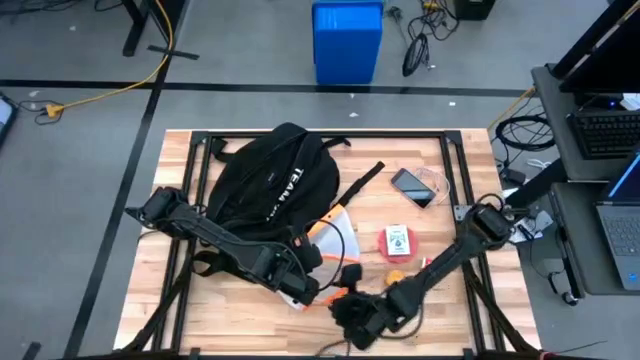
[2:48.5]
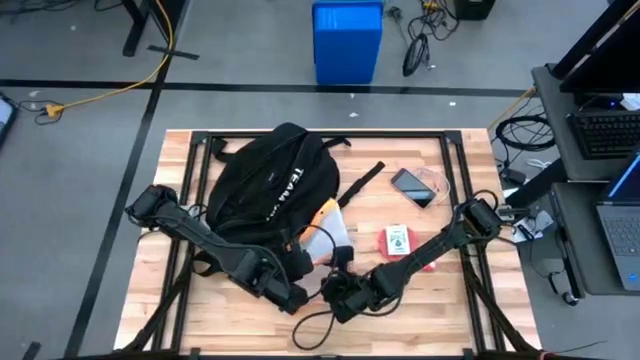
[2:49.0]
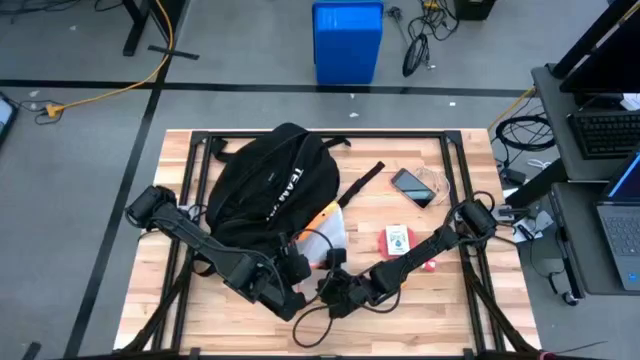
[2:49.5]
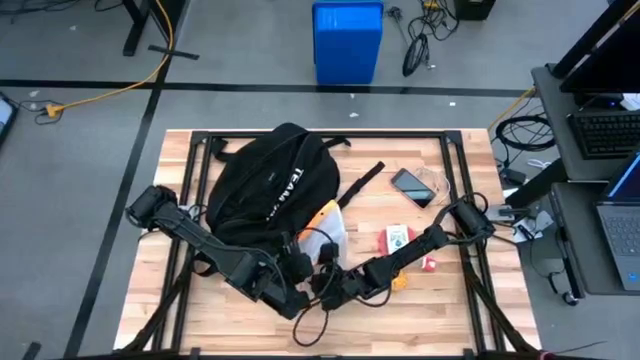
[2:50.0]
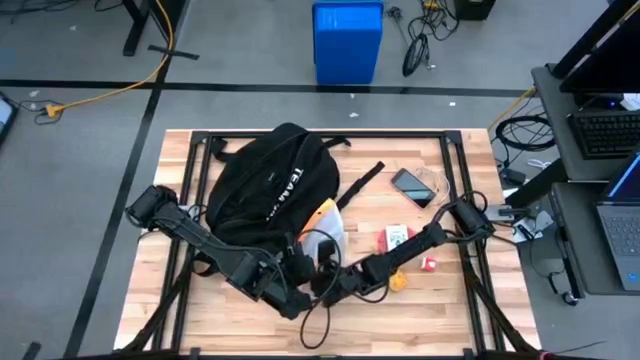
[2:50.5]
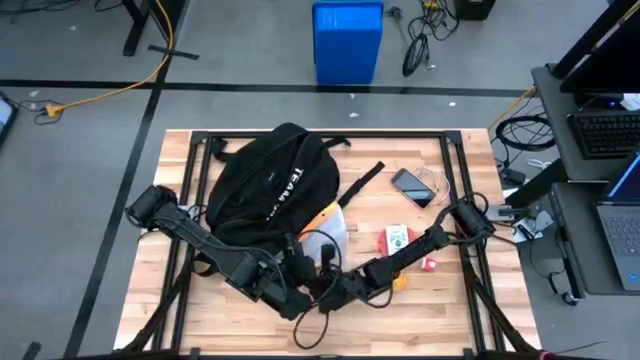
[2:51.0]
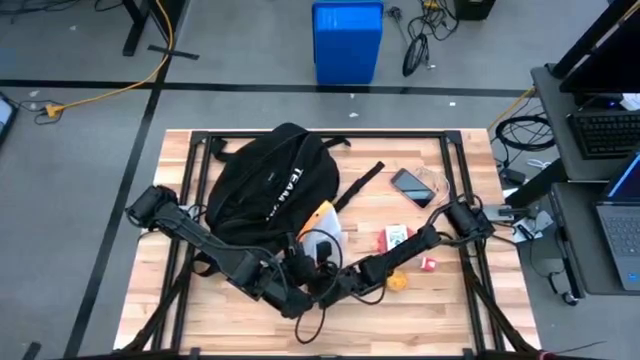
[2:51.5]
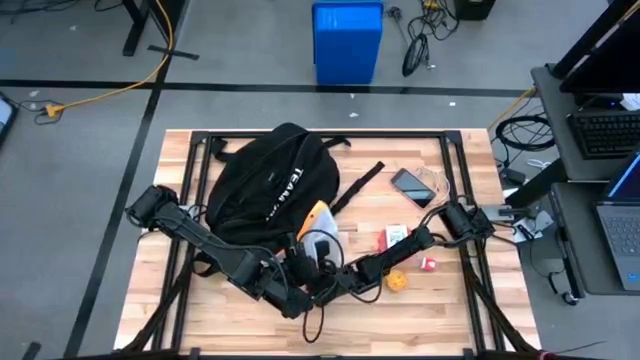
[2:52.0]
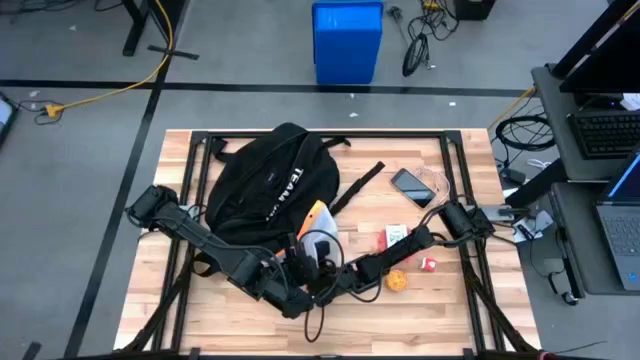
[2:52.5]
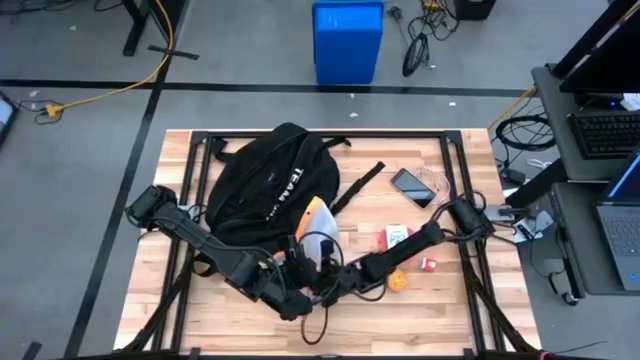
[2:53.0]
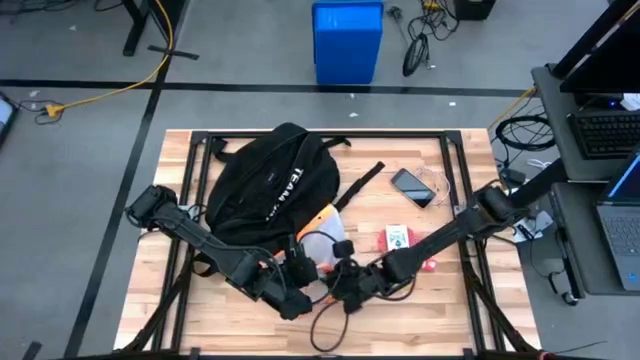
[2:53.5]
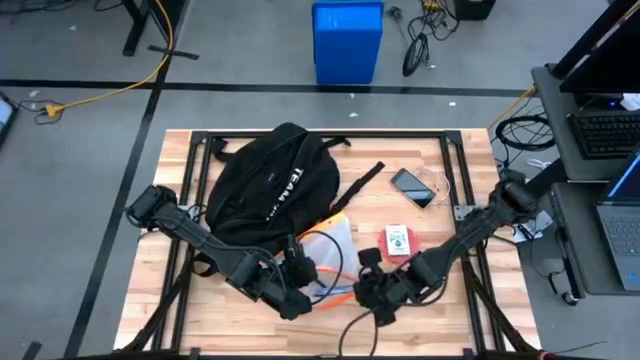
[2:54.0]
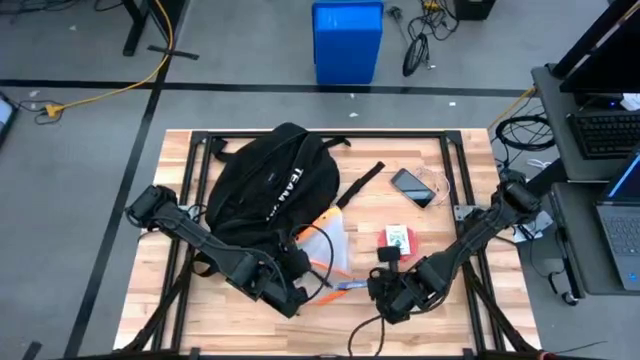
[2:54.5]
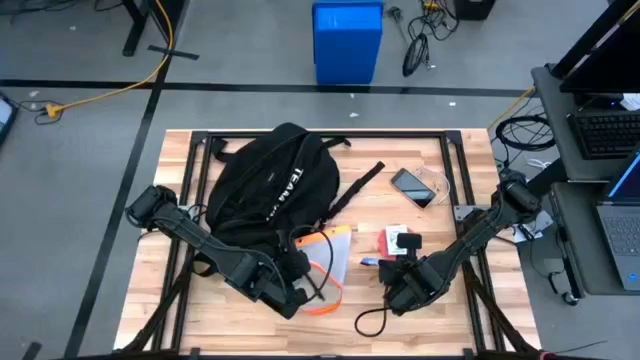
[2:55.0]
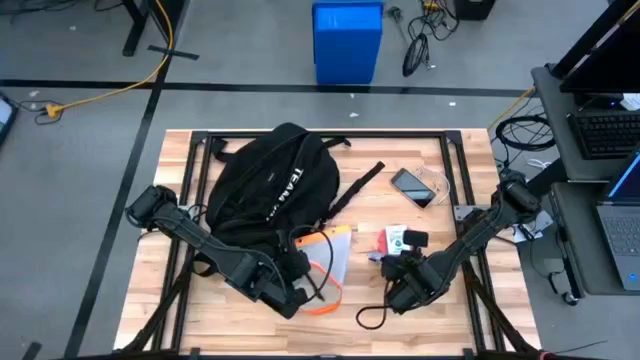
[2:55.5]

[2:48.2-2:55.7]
Task: Unpack backpack
Remove the candy bar from the orange zip bag

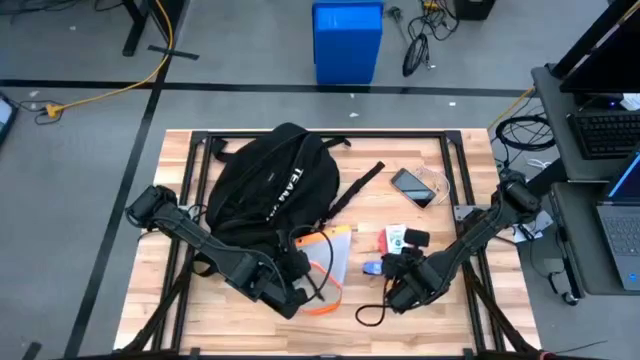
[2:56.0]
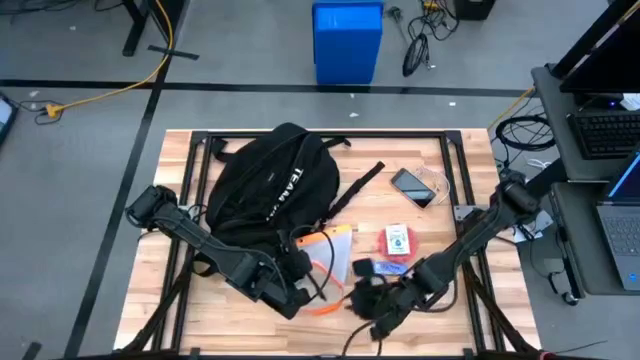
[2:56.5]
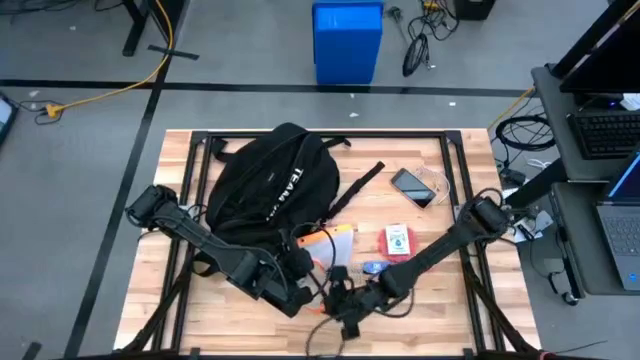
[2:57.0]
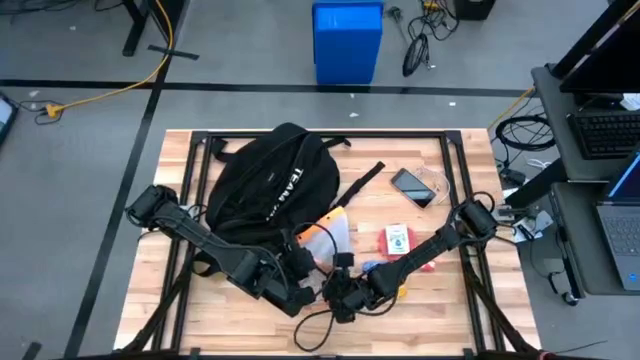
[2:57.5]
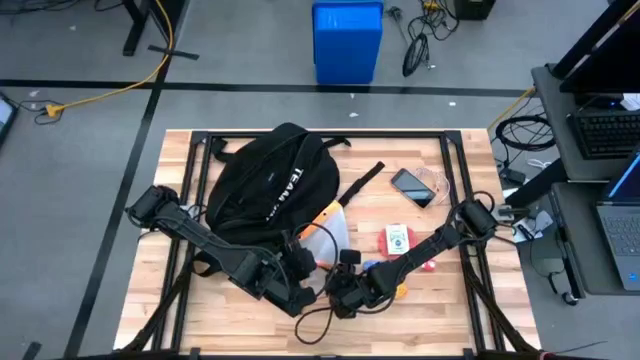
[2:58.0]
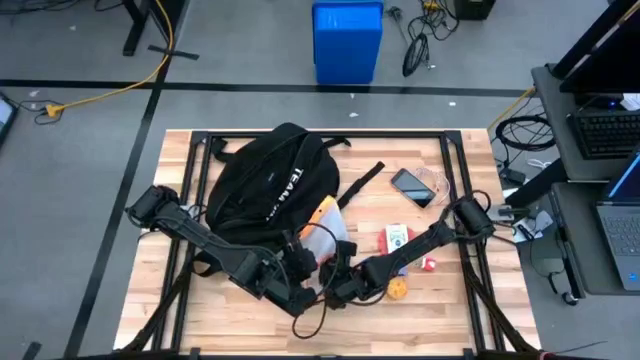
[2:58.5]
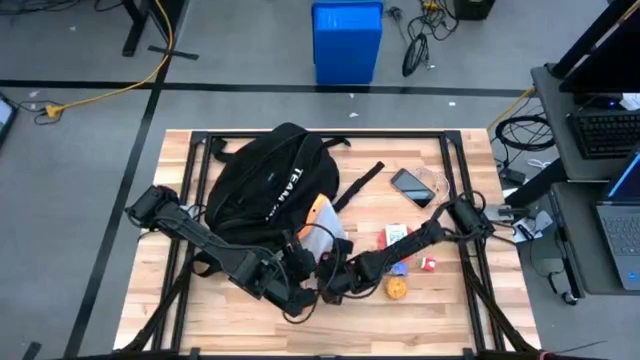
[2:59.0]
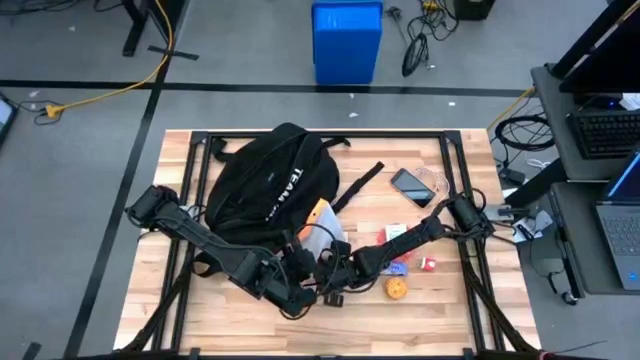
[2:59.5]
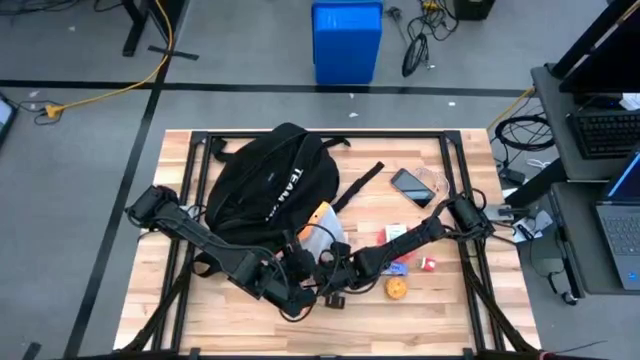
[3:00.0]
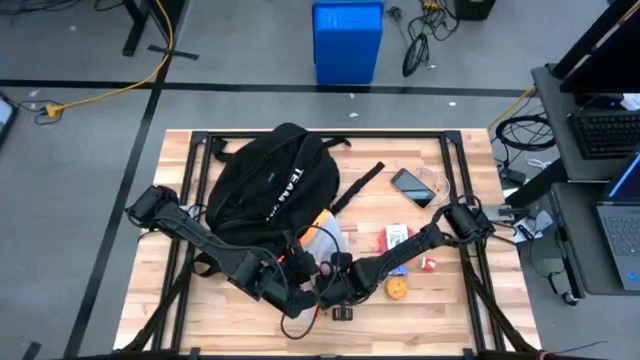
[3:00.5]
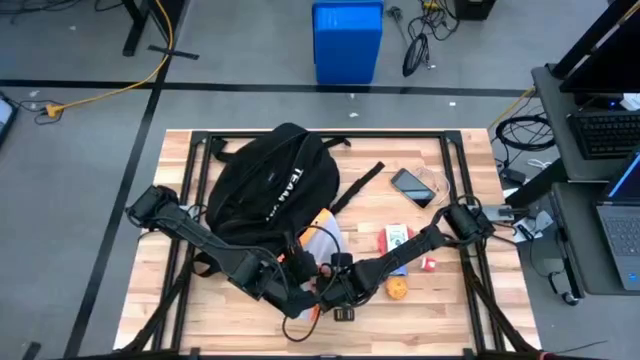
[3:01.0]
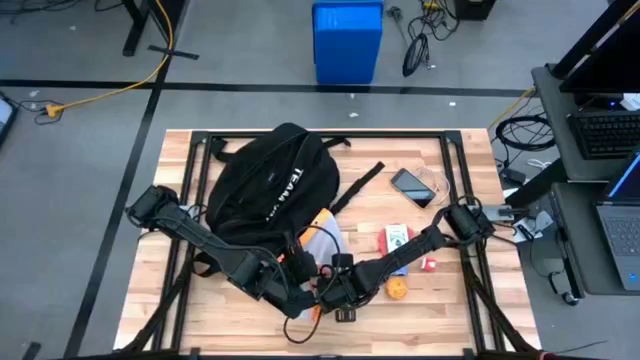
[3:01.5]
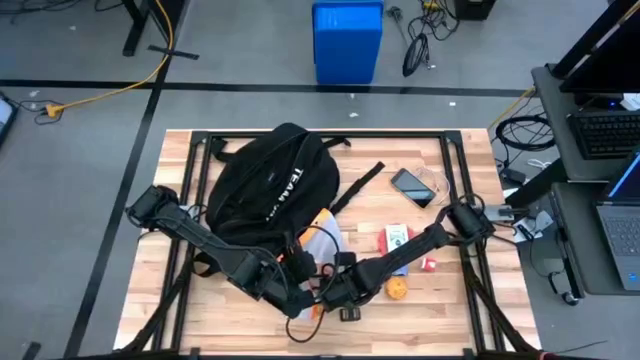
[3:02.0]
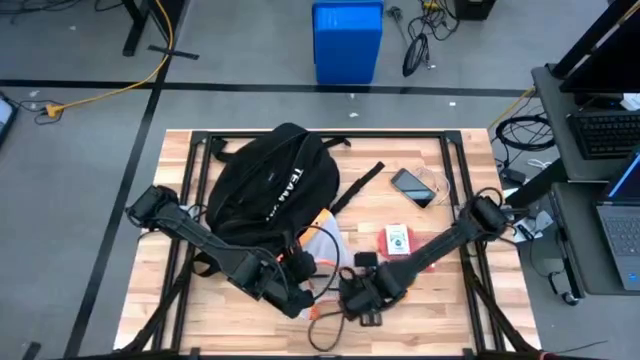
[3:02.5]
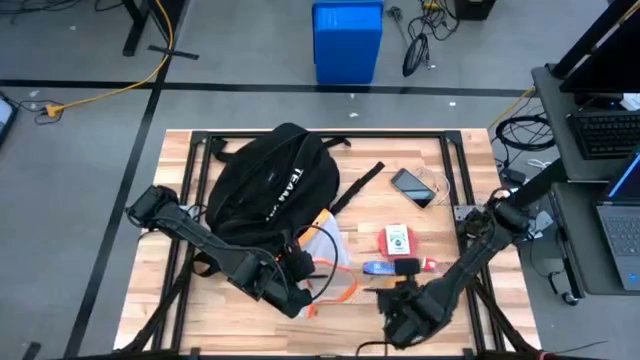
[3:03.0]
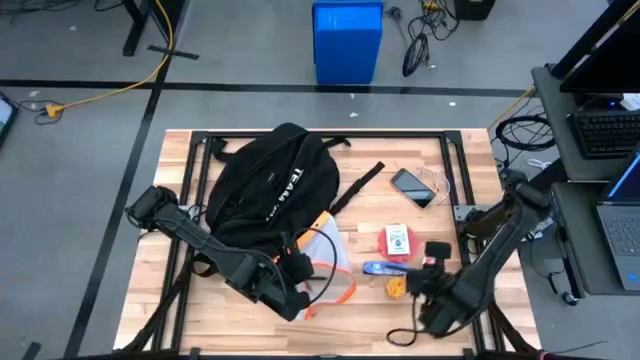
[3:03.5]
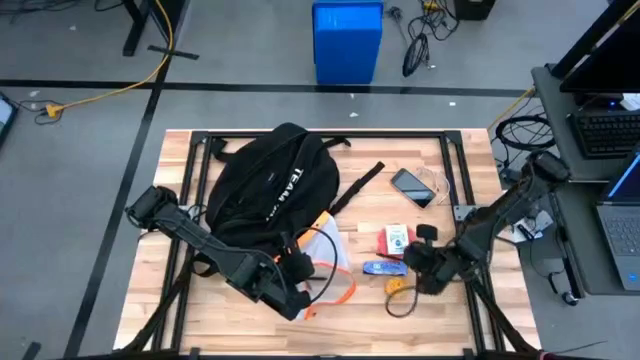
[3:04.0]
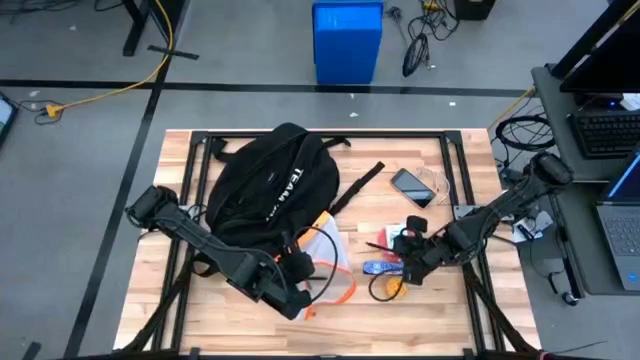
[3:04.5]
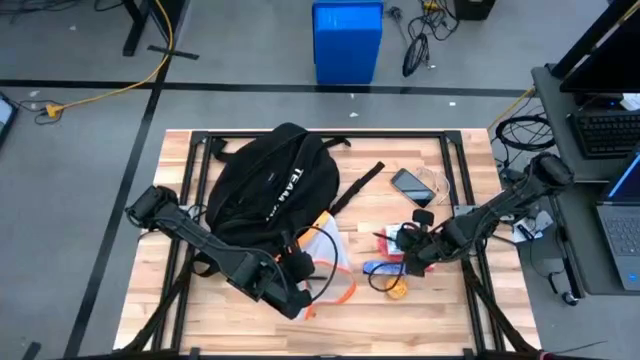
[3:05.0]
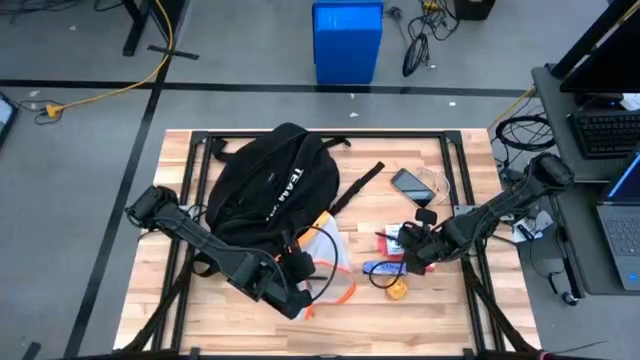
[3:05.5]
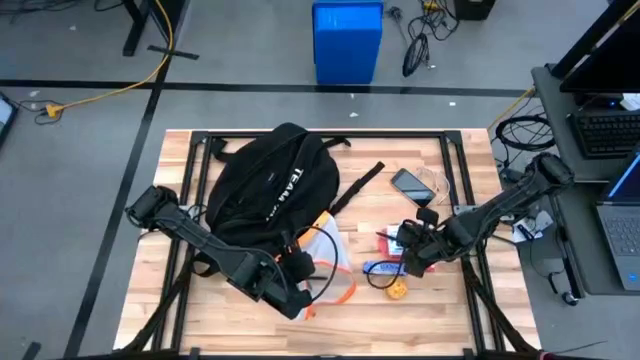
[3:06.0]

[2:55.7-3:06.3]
Remove the black pen from the orange zip bag

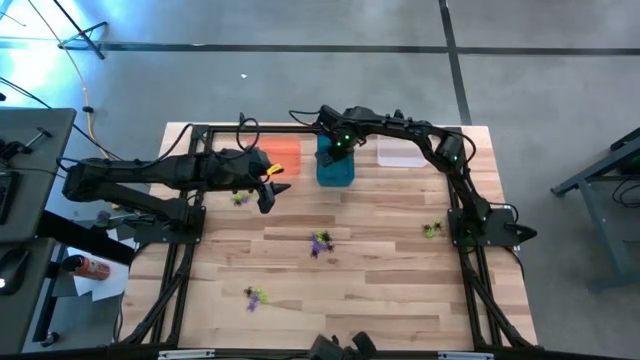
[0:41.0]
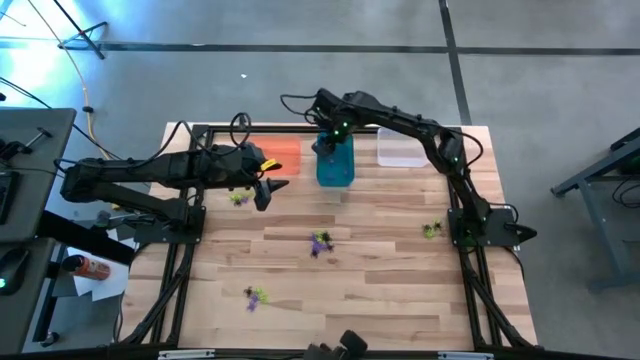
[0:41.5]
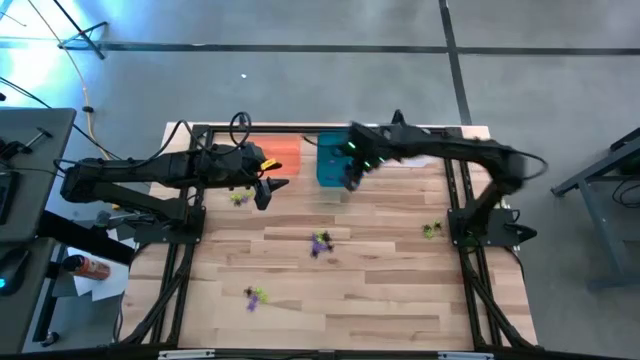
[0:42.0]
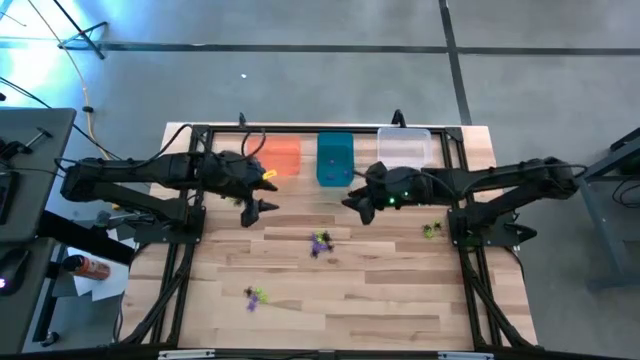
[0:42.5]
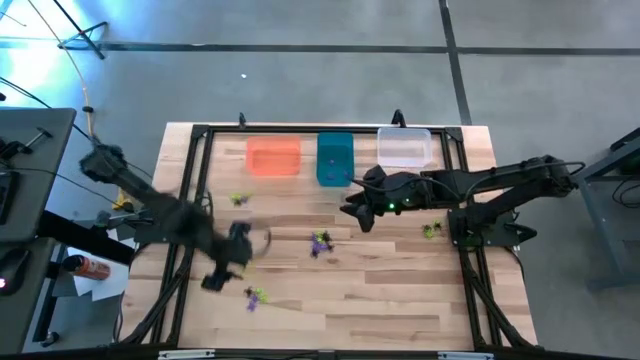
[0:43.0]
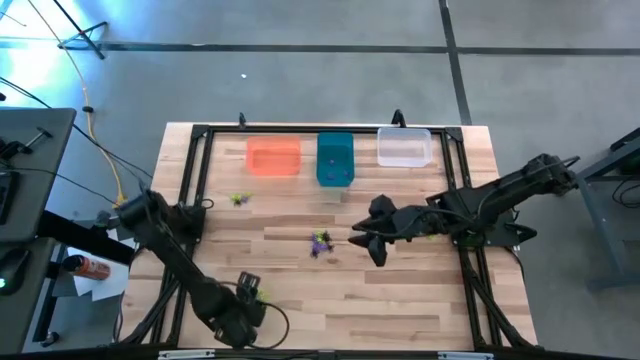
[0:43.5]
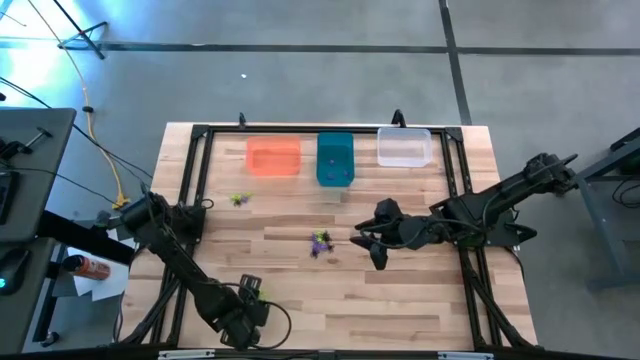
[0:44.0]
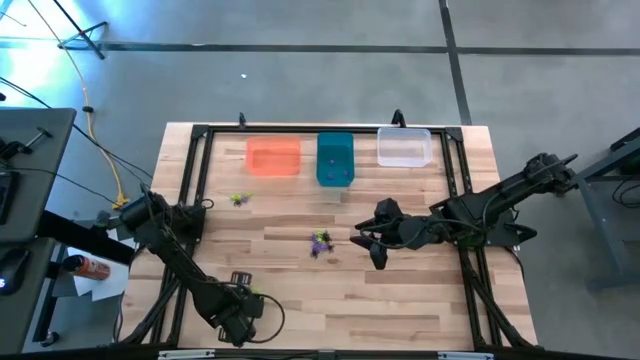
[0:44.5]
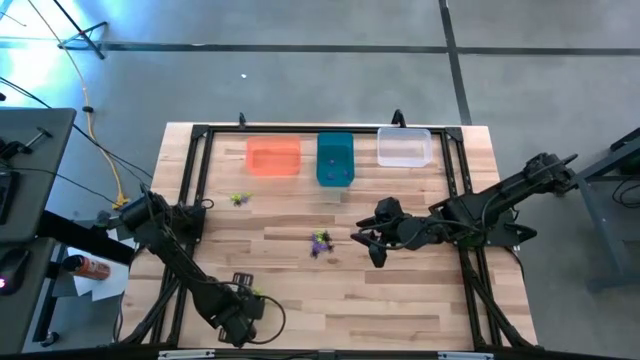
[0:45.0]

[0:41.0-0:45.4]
Task: Sort Halloween decoration
Put the purple spider toy into the blue bin
